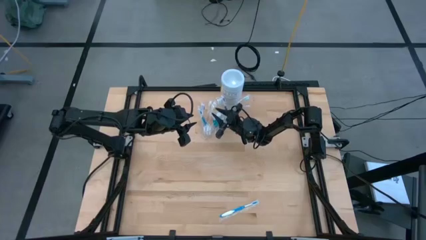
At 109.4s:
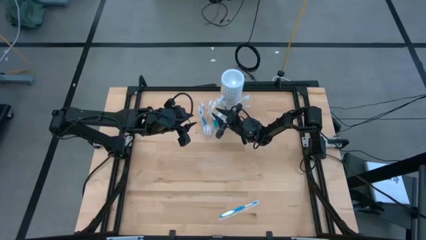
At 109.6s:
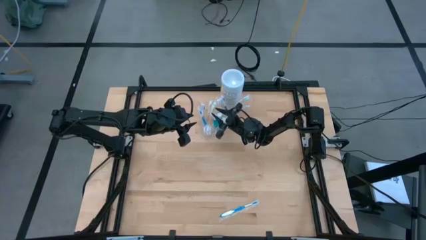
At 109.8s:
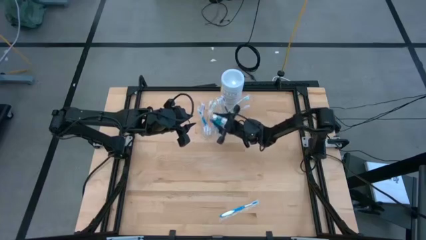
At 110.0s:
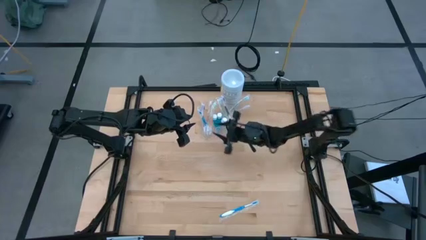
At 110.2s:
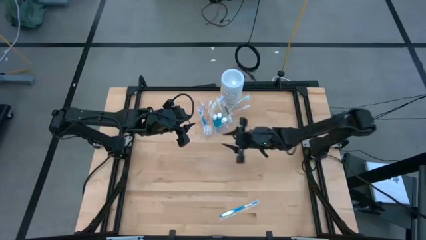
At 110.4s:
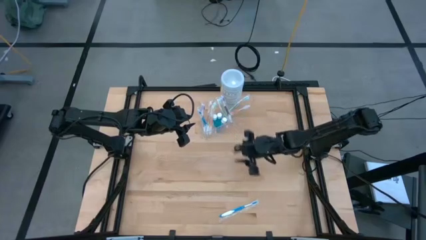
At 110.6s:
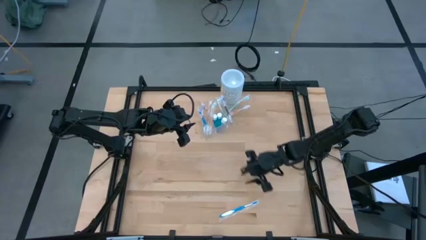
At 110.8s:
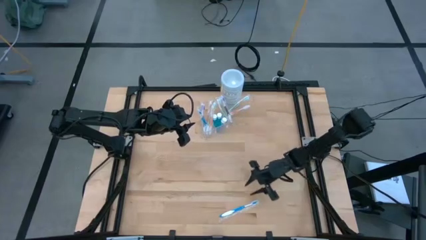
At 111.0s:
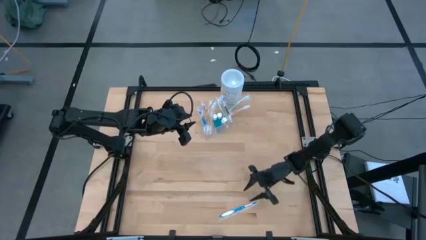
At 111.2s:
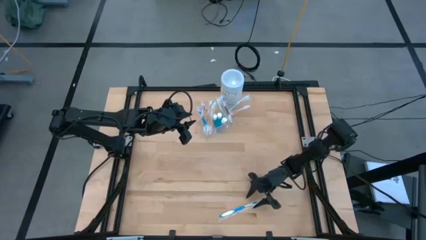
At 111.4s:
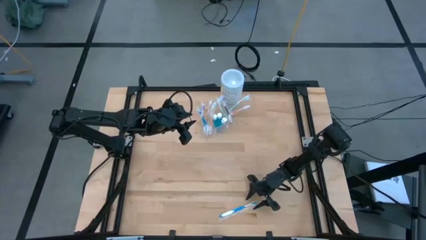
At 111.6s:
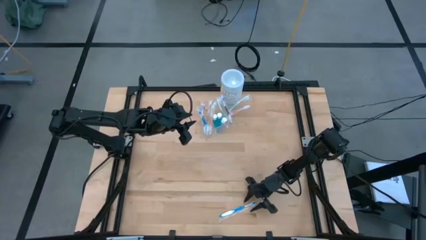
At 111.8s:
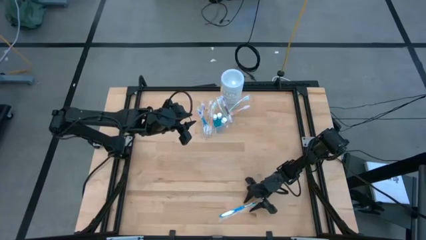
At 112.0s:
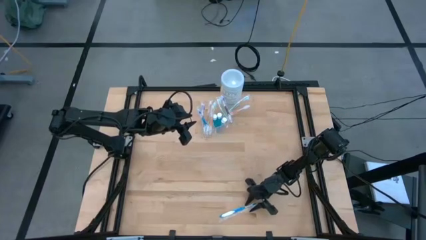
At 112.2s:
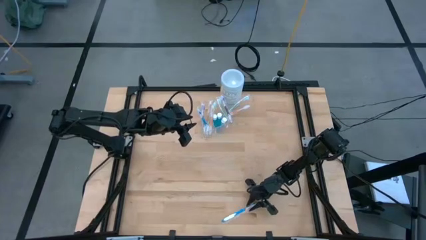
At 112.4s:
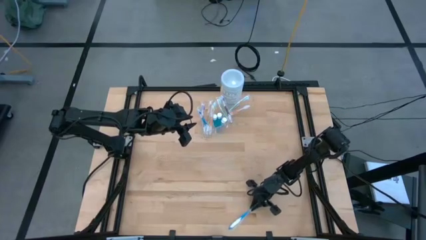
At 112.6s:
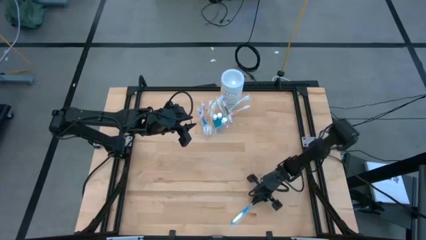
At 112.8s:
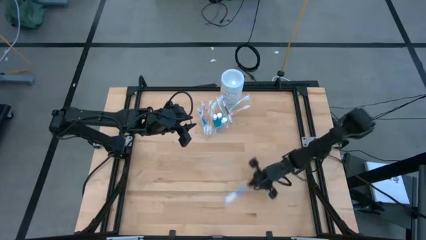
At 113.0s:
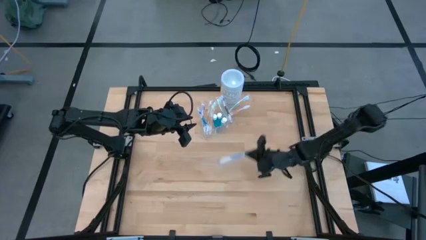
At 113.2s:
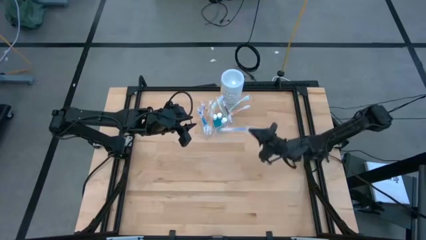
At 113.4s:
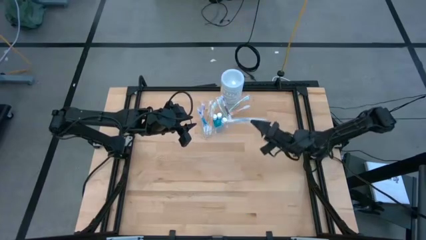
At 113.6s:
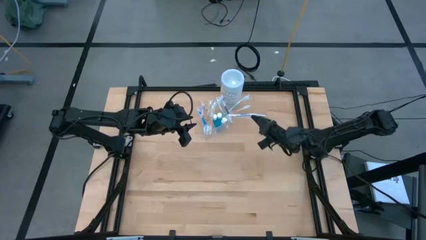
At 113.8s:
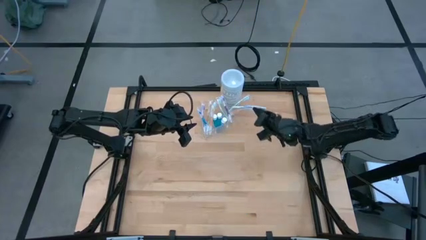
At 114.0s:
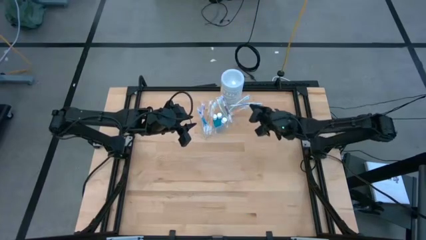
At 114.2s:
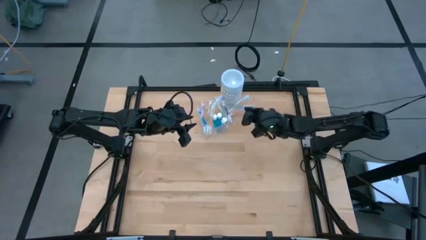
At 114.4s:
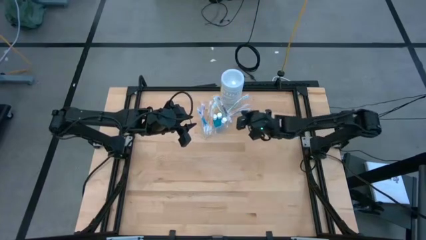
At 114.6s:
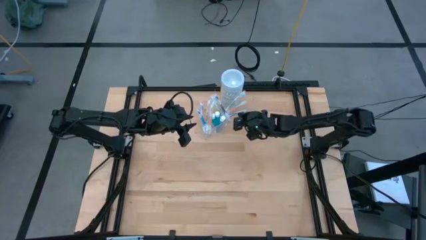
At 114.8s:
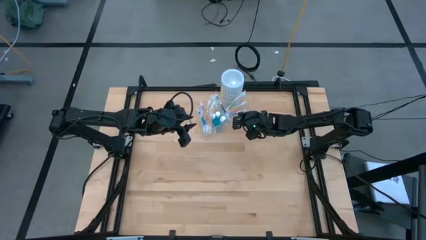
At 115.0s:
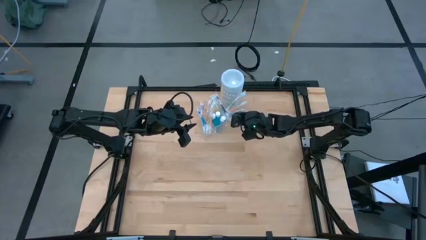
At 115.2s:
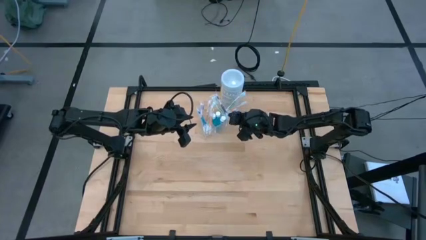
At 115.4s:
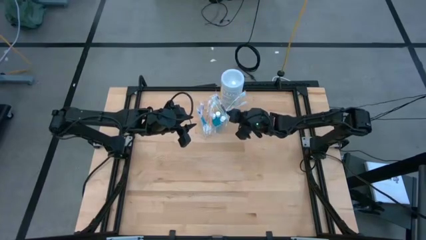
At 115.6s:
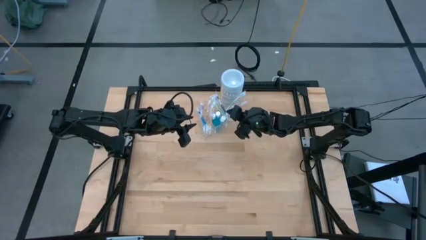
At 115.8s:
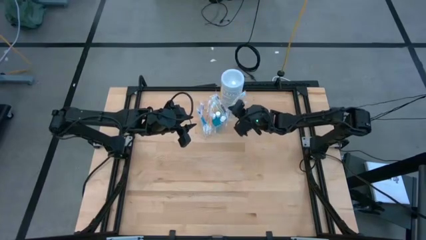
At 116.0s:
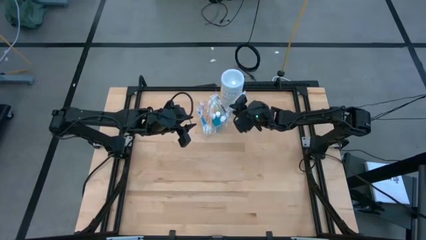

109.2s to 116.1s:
Task: Pick & Place toothbrushing station
Put the blue toothbrush into the transparent organizer

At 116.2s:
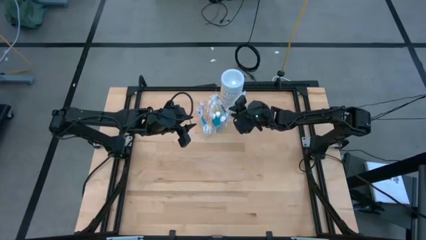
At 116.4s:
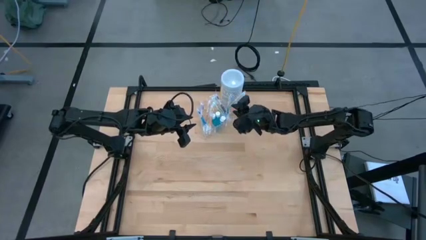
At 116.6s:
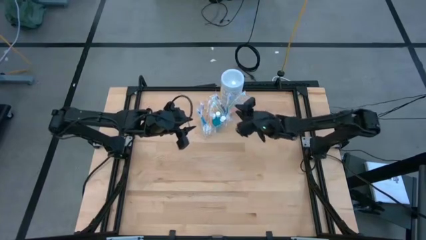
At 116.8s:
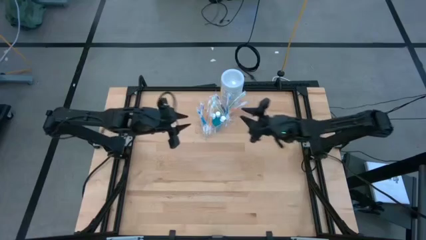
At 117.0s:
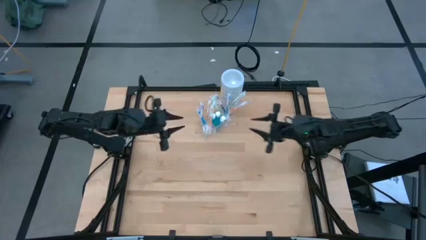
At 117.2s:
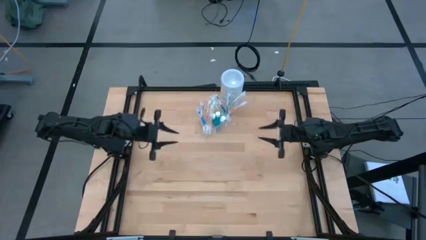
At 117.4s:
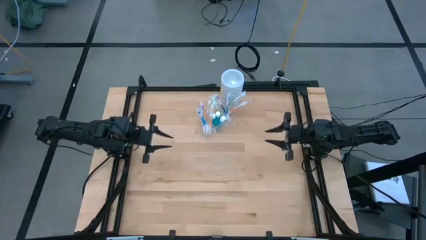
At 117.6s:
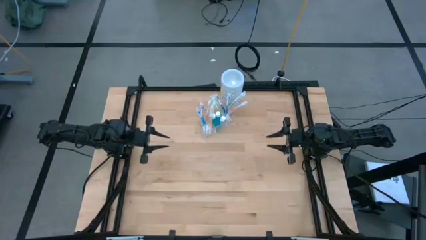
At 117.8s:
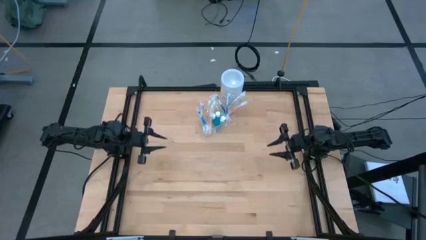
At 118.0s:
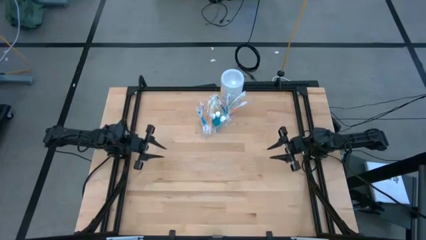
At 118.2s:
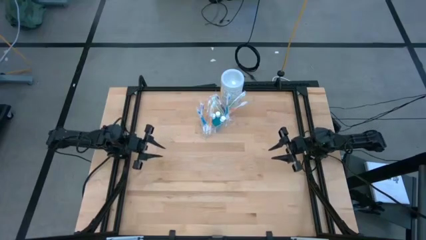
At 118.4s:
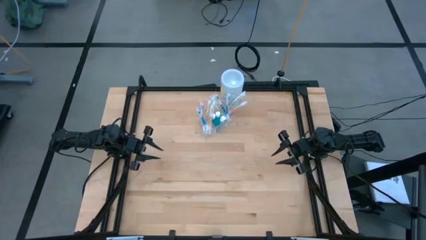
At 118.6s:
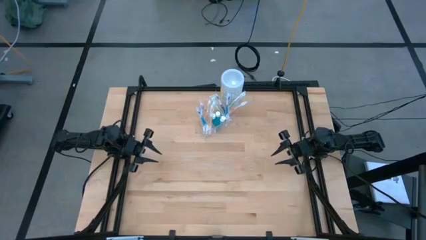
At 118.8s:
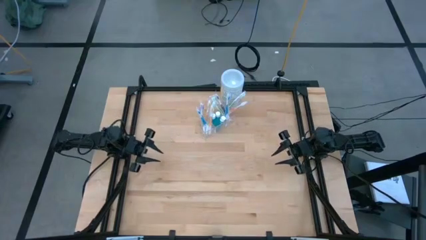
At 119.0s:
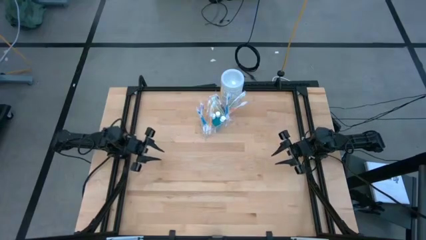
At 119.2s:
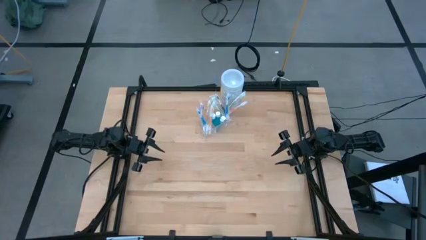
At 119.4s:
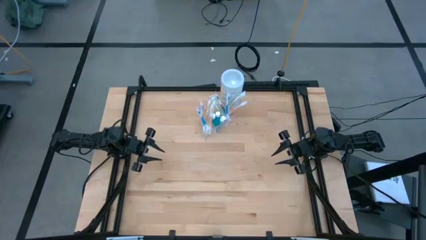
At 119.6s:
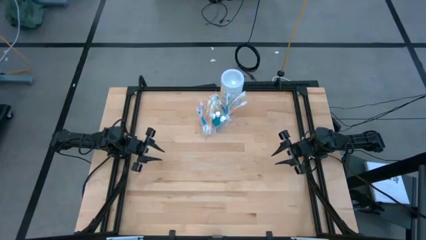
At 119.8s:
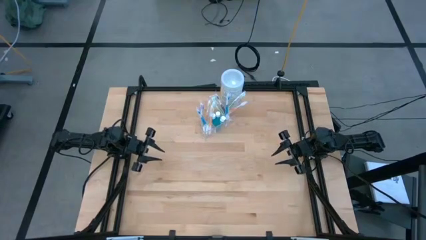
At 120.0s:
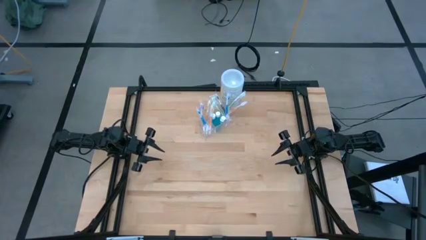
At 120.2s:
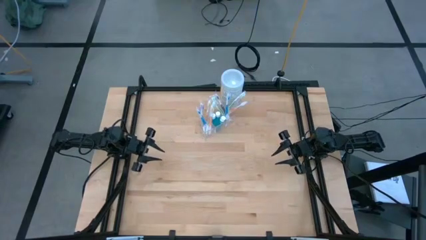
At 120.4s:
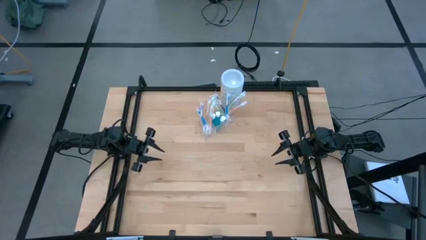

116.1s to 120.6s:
Return to Home Position

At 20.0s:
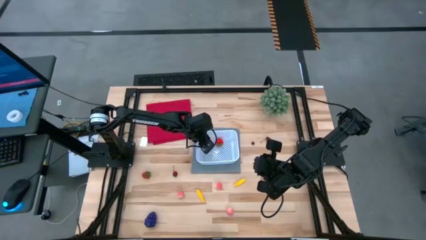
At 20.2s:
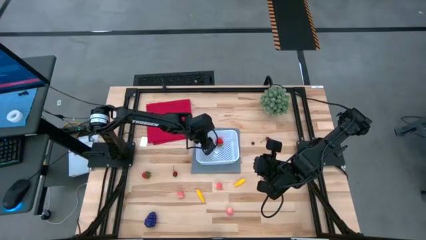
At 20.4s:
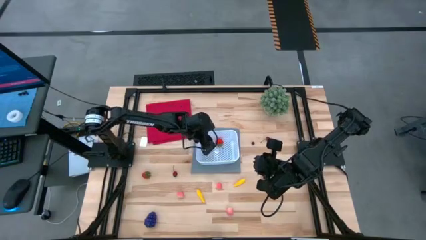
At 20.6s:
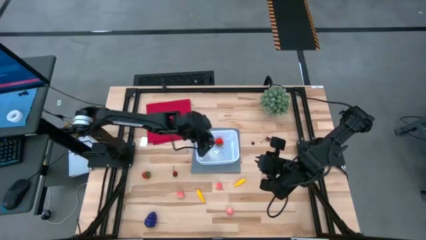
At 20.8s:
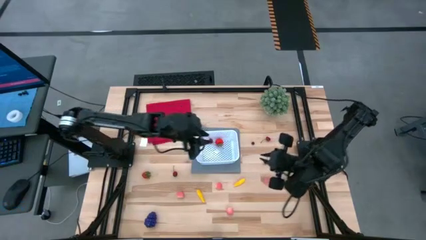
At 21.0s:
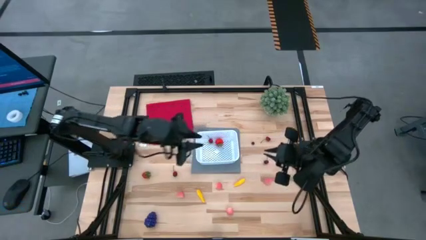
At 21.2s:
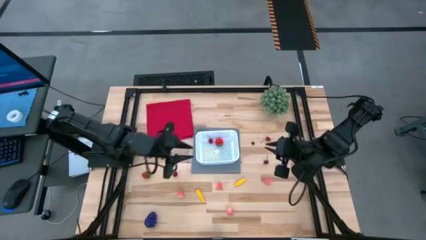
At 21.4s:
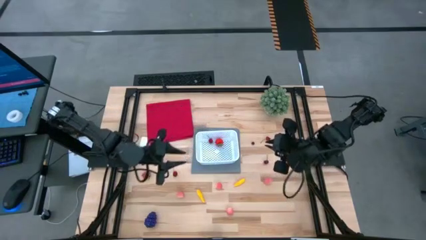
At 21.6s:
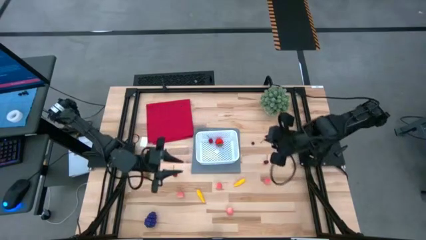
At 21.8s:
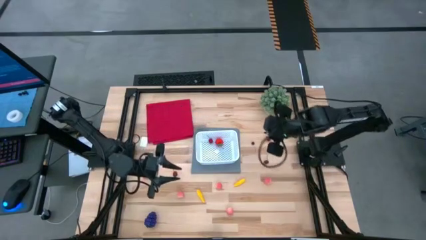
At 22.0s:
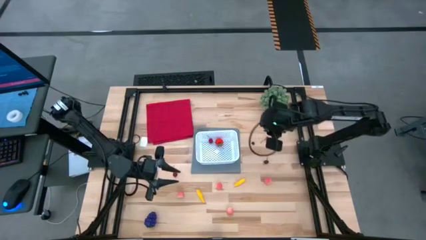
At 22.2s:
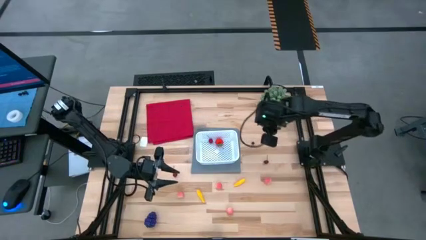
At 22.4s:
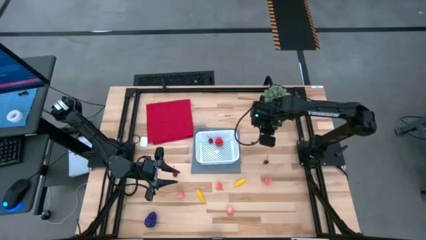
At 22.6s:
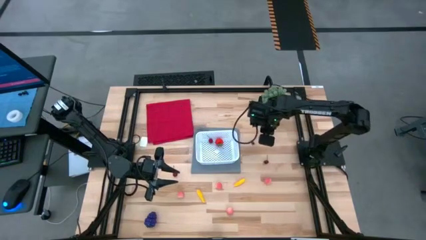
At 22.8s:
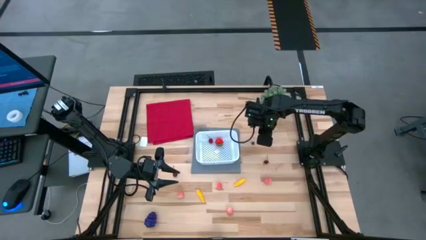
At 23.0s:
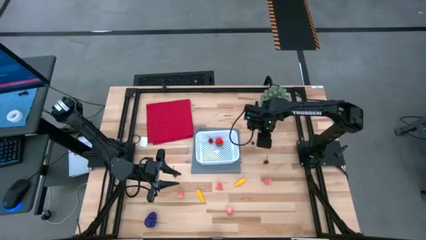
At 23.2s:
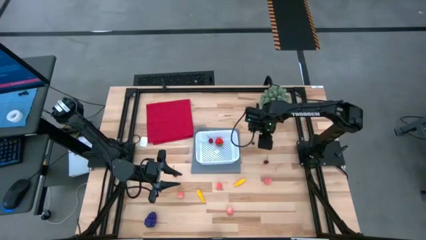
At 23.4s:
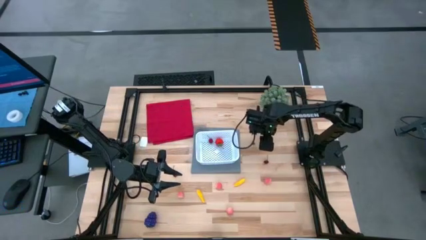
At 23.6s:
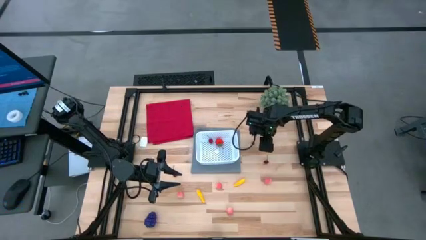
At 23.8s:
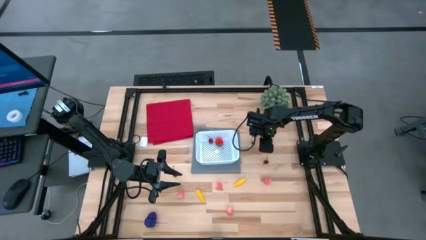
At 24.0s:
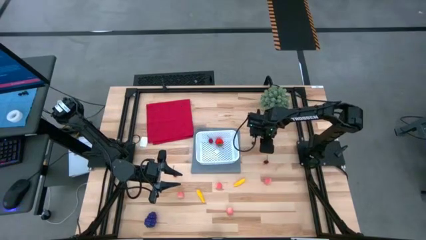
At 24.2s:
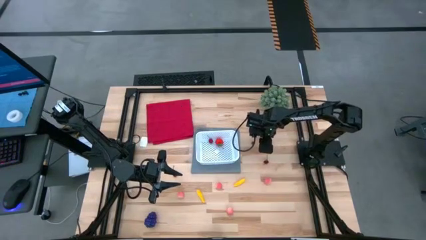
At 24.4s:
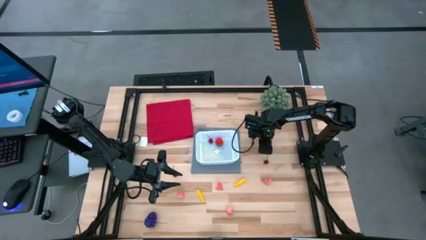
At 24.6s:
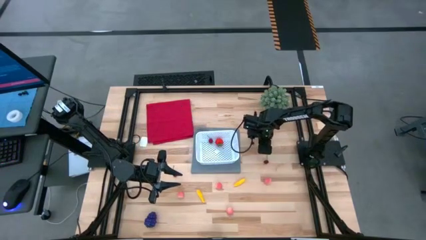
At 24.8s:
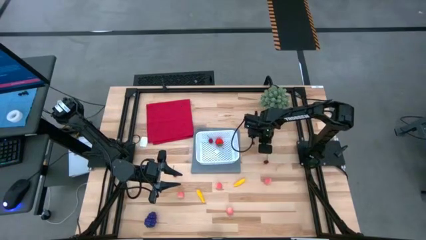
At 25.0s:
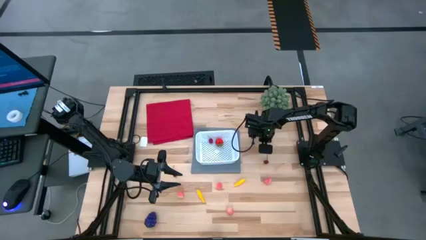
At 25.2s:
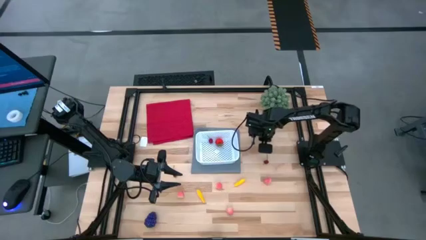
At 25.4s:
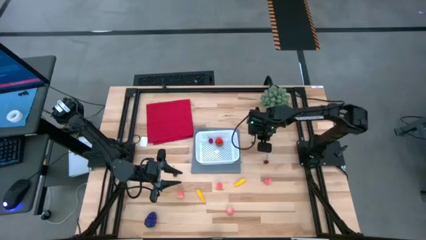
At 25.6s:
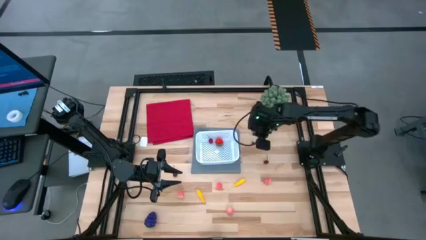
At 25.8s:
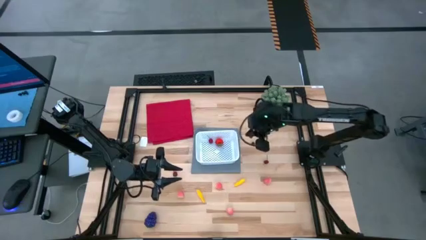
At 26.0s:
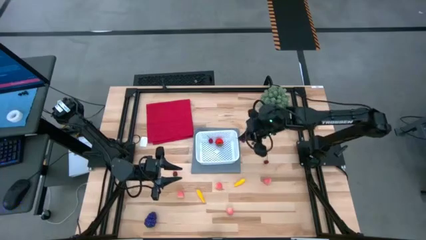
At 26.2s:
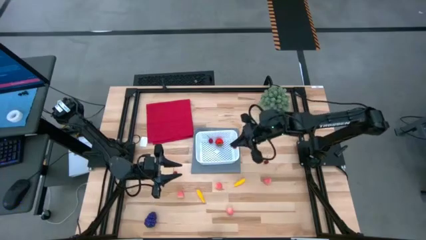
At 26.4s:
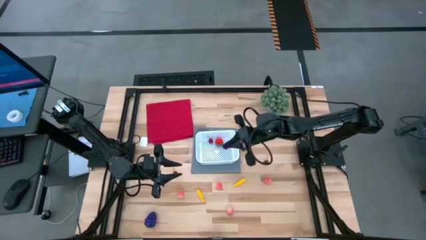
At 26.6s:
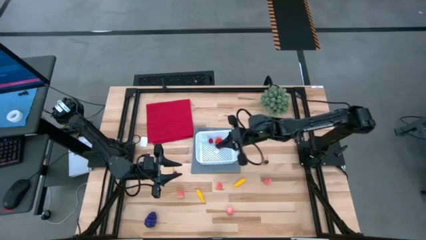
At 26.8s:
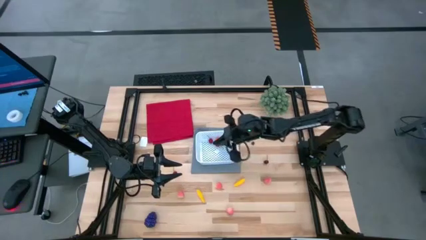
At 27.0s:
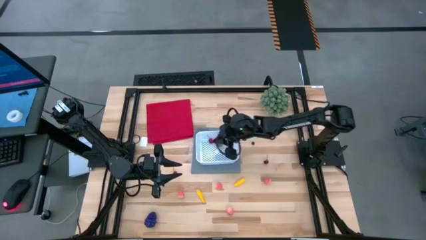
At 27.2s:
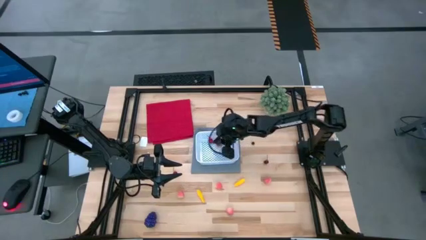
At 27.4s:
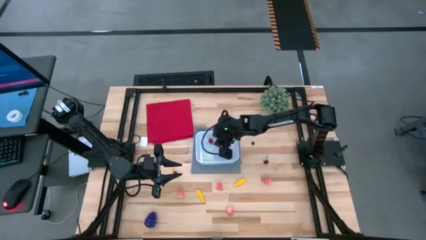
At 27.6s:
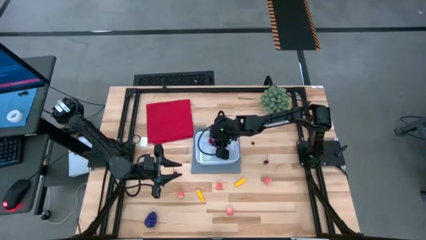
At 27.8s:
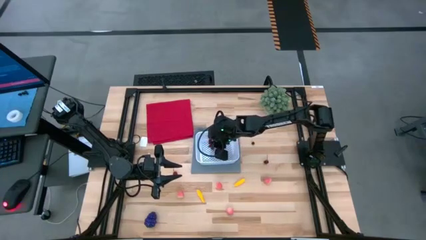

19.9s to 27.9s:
Task: Pick and placing Produce into tupperware
Put the top right cherry into the white basket
